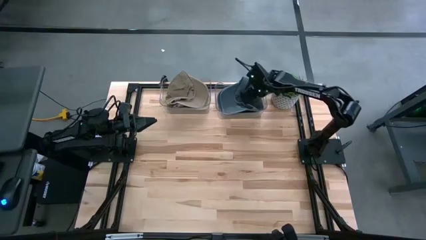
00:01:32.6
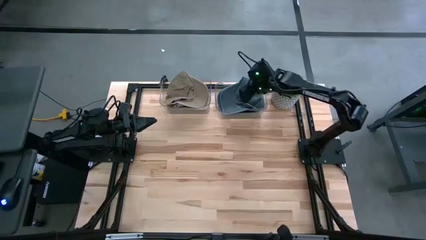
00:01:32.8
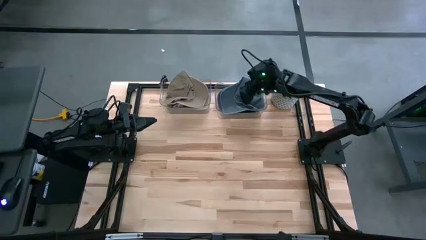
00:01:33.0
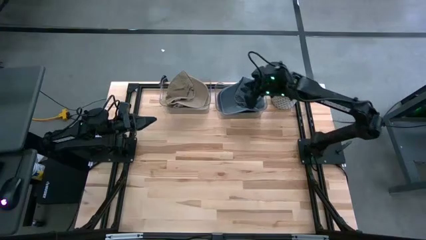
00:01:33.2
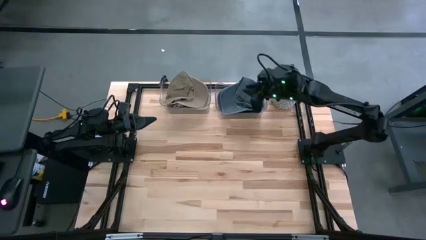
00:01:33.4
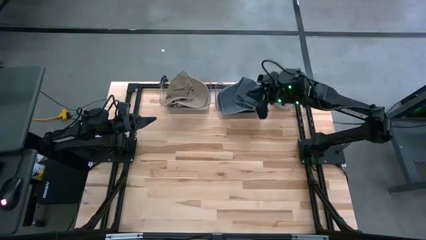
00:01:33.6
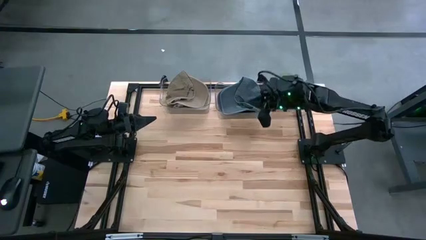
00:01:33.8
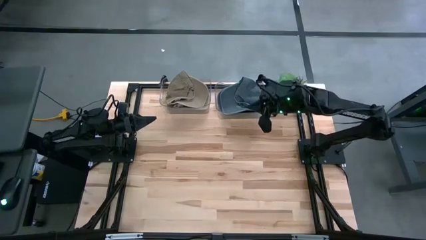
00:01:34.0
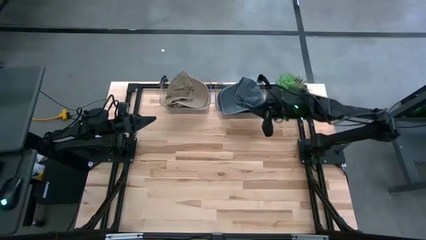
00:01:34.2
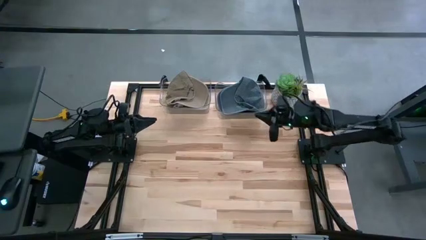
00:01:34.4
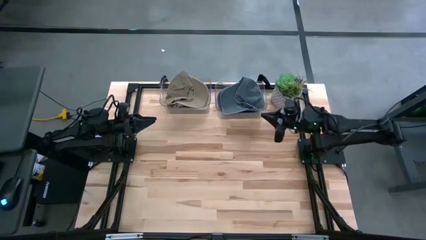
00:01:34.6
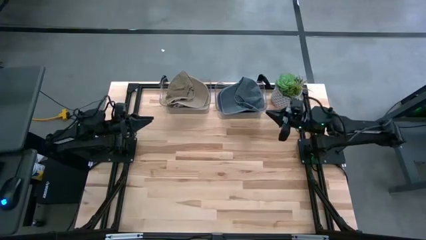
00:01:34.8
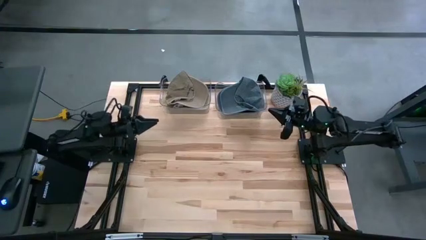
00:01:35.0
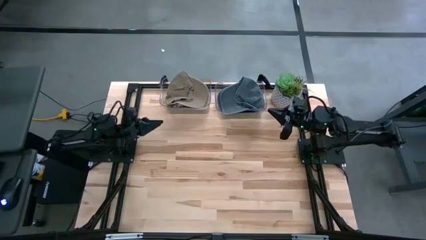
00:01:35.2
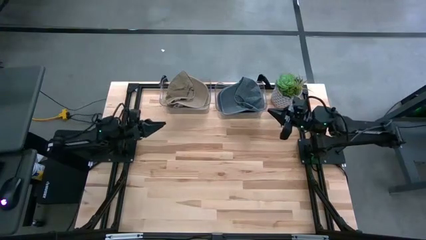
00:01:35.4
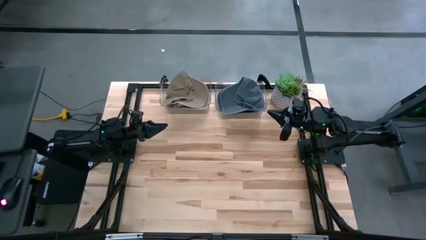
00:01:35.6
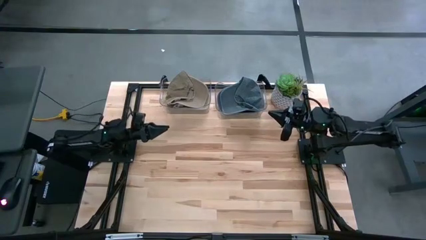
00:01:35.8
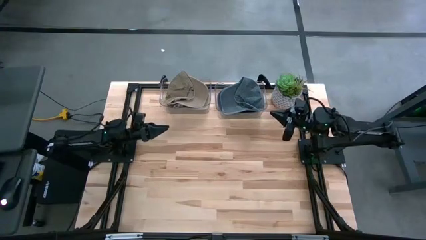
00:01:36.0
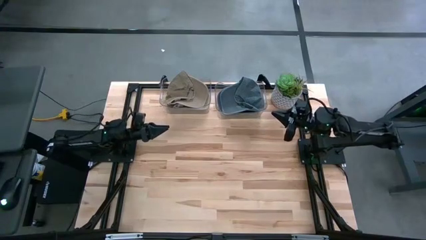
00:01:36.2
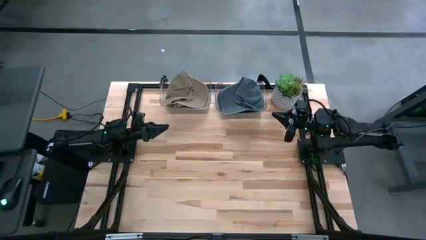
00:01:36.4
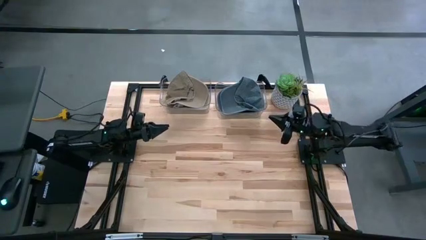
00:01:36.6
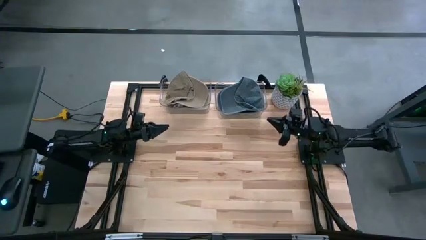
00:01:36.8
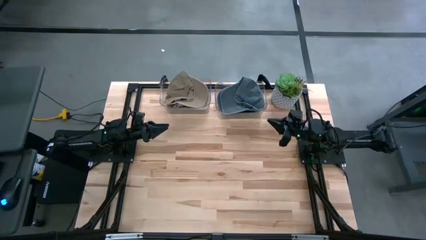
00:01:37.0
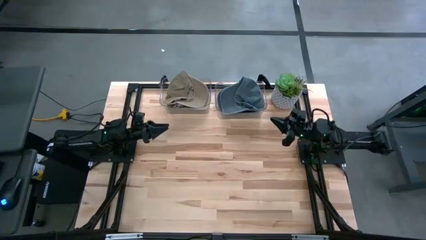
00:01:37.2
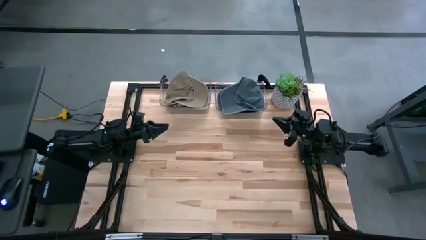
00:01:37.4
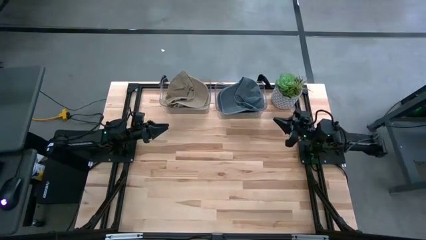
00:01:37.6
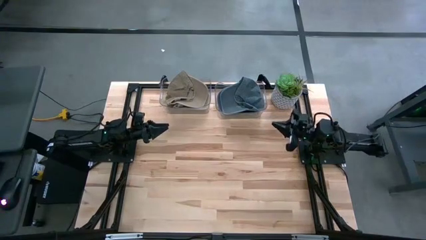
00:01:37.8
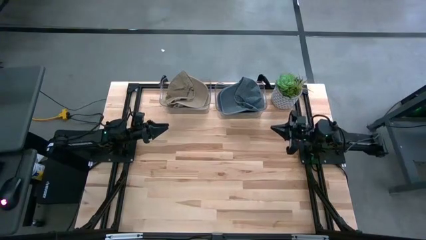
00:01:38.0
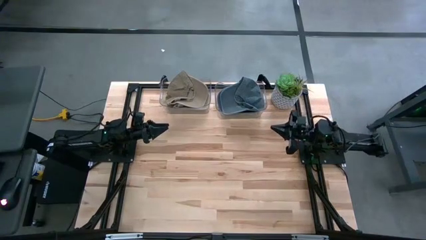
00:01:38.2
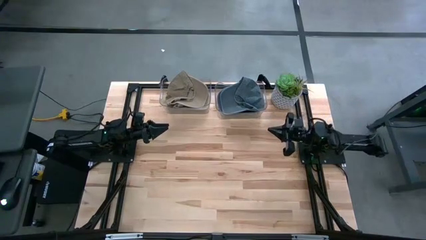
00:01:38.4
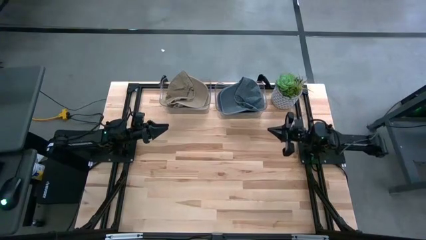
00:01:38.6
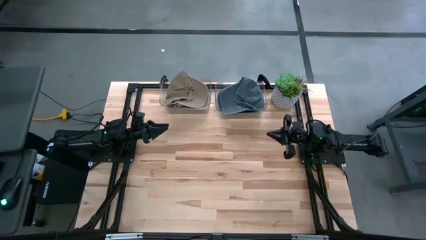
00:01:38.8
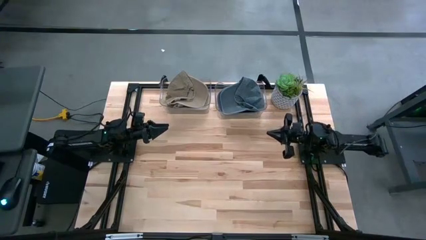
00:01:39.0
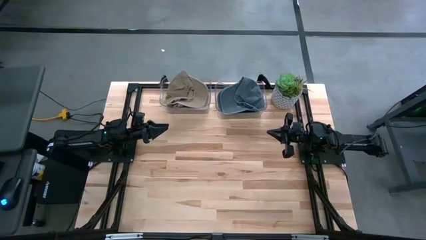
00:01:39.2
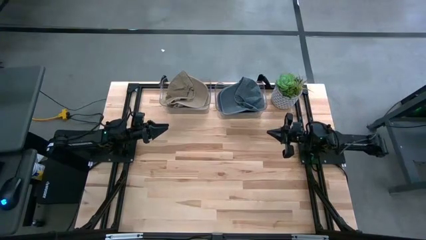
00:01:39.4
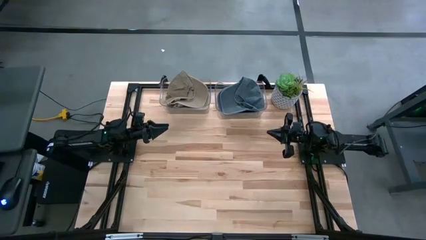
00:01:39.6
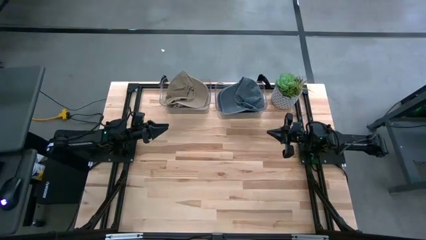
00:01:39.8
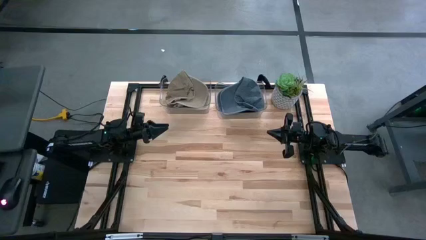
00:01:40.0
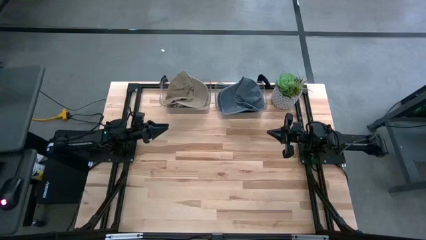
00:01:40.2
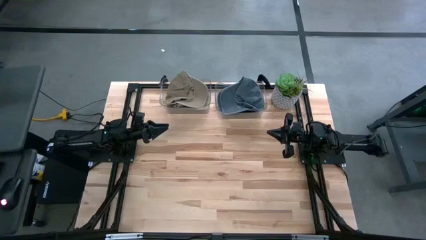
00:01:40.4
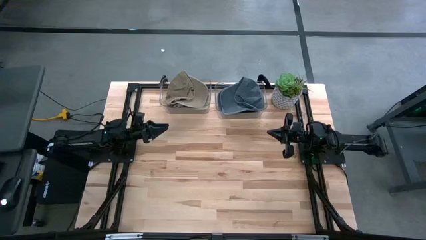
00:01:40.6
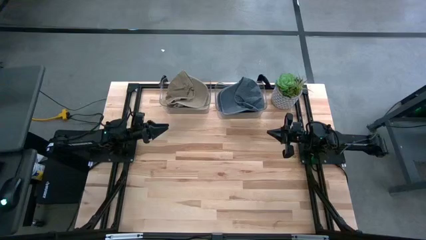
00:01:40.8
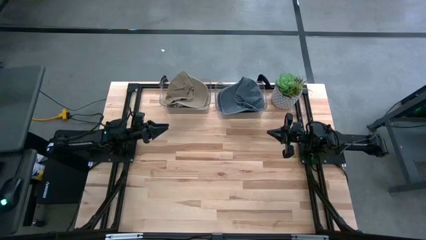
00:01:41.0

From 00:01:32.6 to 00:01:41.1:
Task: Pick & Place hat
Return to Home Position

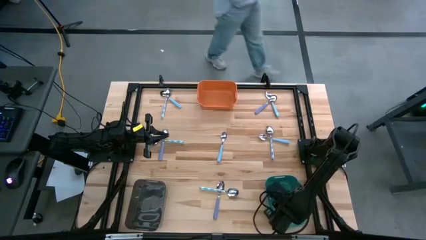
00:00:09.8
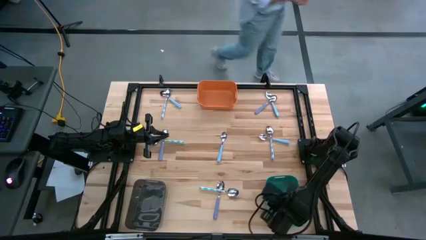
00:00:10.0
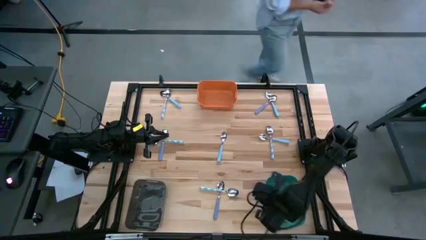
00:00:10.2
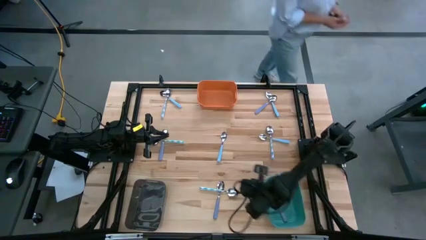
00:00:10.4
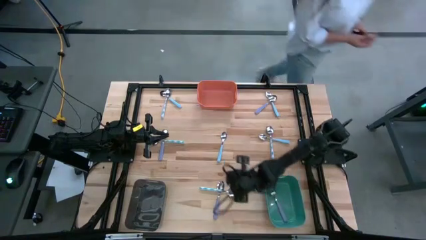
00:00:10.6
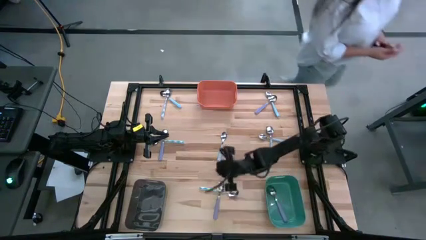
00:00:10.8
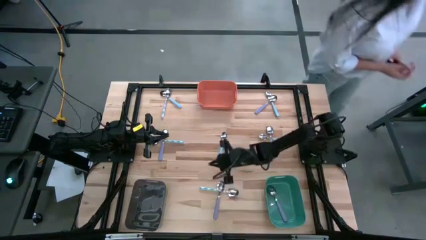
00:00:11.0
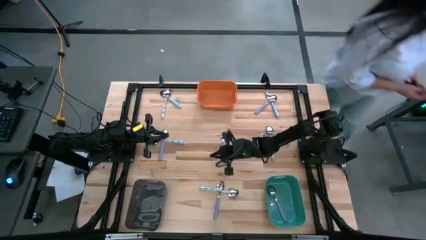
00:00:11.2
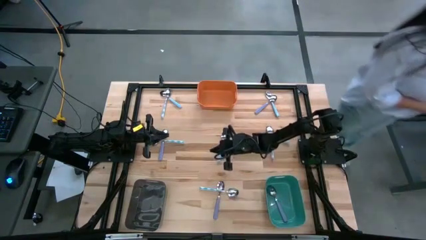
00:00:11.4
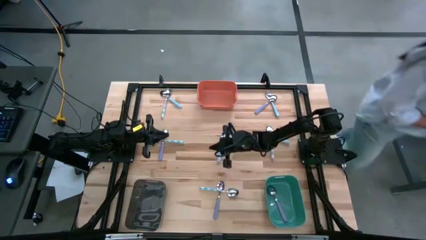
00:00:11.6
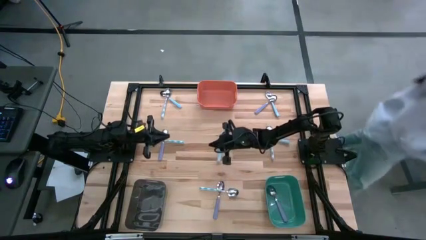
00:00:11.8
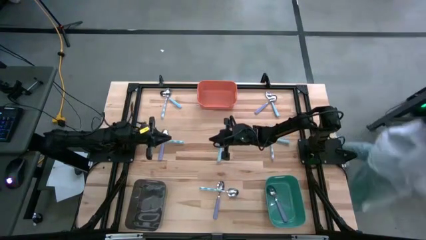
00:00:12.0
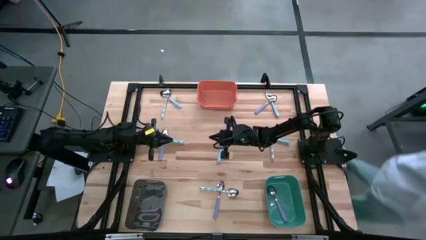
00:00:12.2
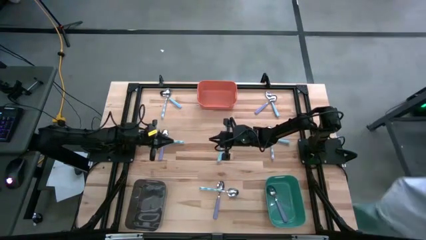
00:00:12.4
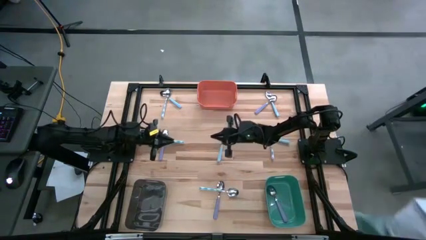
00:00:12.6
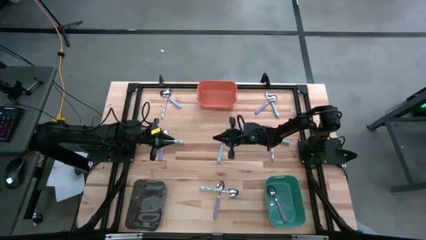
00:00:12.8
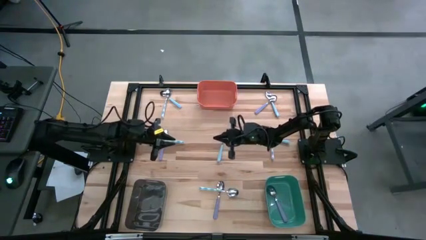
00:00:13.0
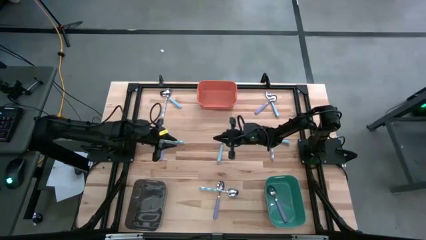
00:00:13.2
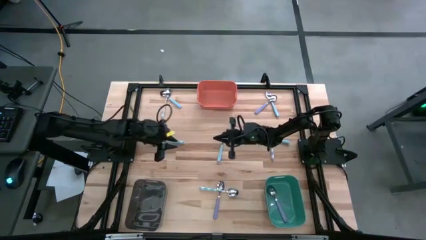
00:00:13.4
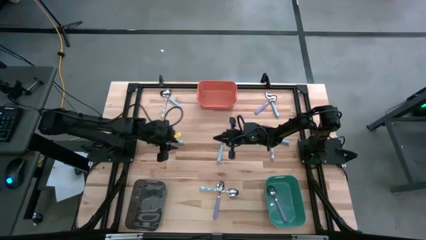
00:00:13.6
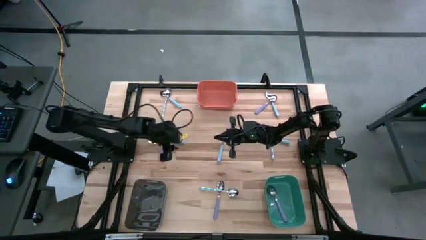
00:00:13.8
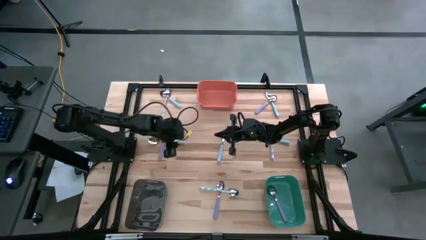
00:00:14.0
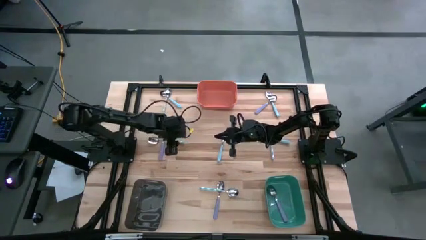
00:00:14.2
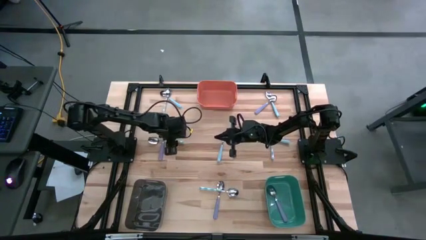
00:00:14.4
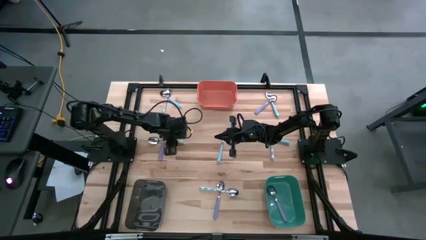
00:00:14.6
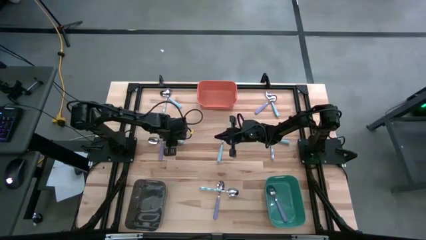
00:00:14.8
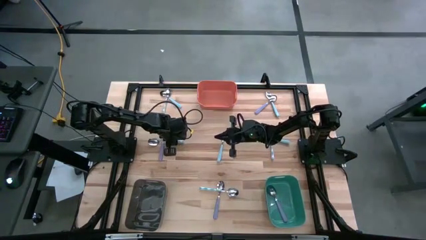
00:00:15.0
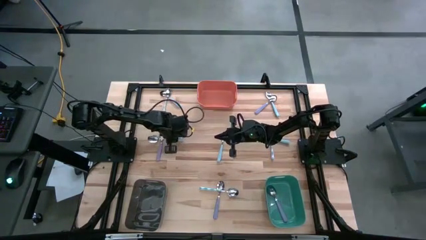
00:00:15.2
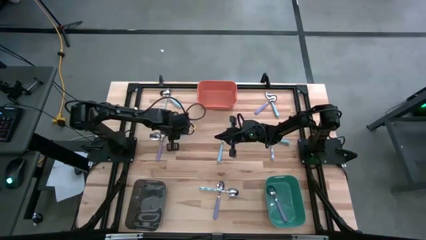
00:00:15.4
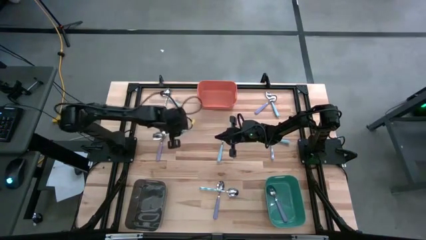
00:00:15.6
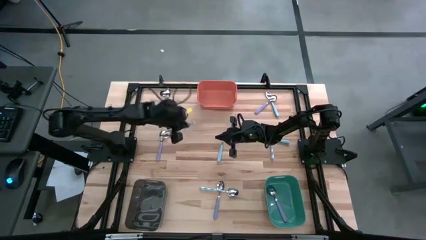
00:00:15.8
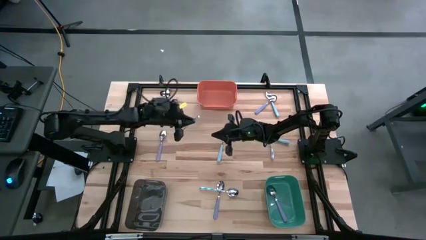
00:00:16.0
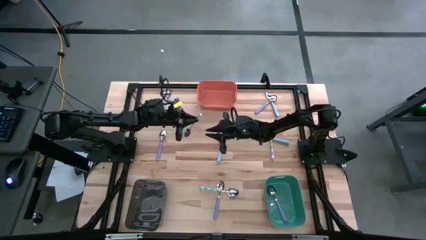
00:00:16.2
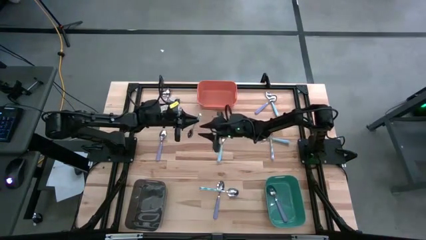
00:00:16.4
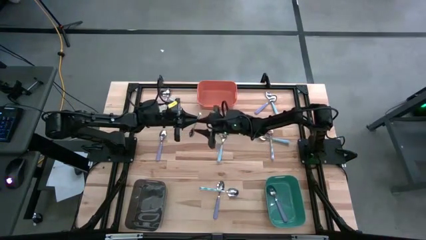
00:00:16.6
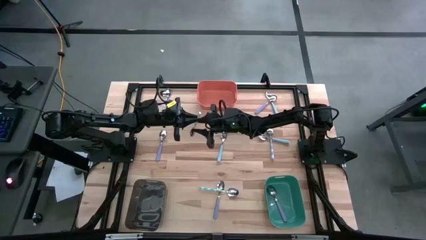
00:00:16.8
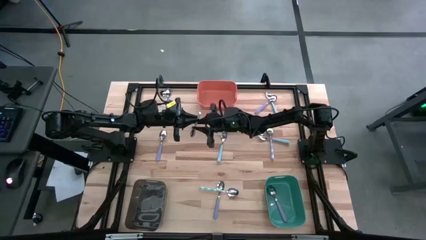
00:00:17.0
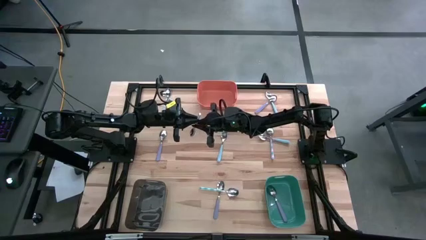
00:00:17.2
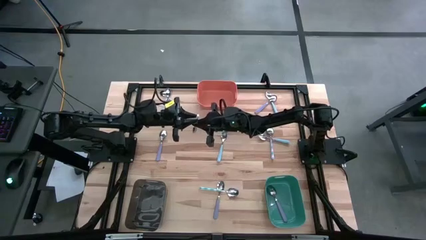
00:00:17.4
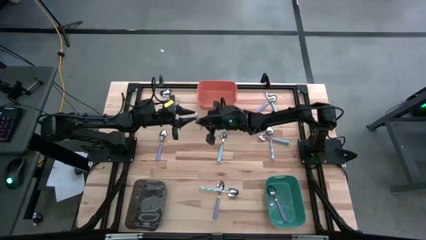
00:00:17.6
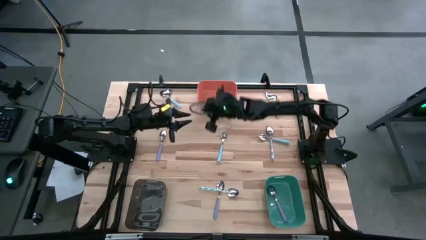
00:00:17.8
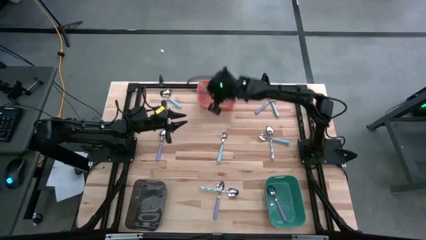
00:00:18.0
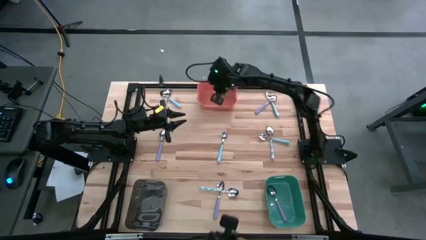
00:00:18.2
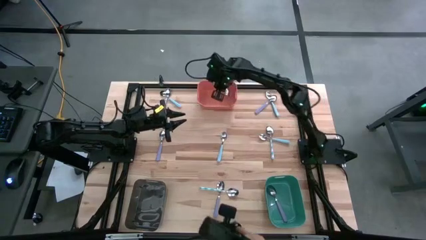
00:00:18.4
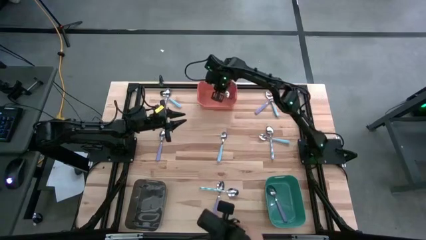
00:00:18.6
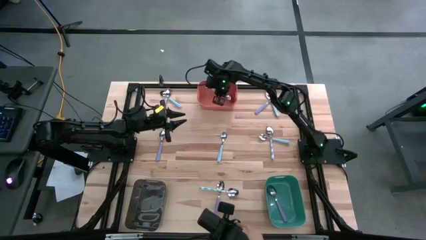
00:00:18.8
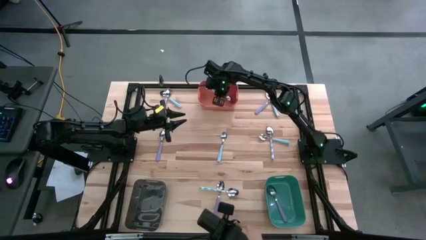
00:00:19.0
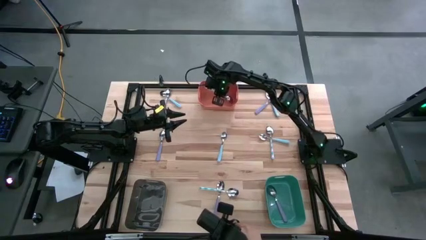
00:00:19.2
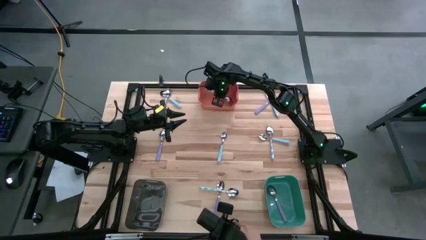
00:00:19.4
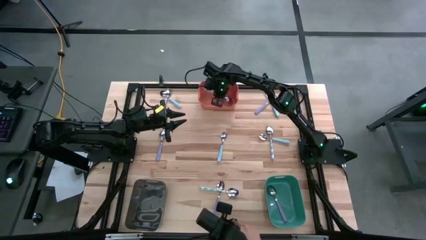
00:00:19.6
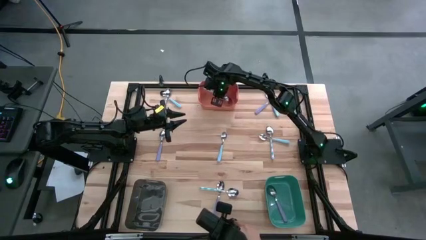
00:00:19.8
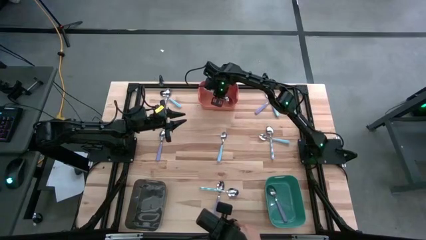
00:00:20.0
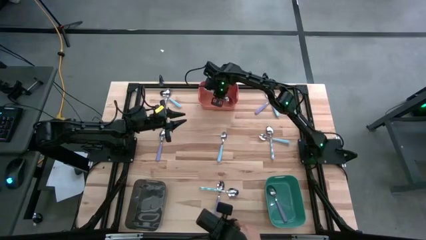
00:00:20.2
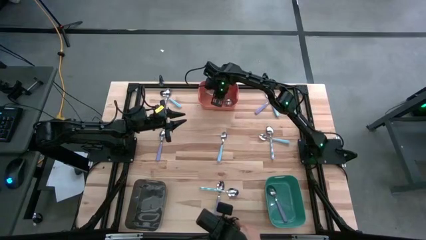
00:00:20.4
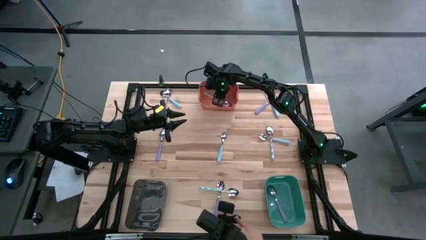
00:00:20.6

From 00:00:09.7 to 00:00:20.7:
Task: Sort silverware by color (type)
Put the middle left blue and white spoon into the orange bin
